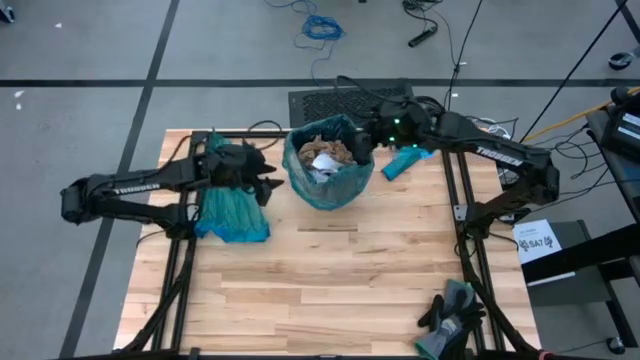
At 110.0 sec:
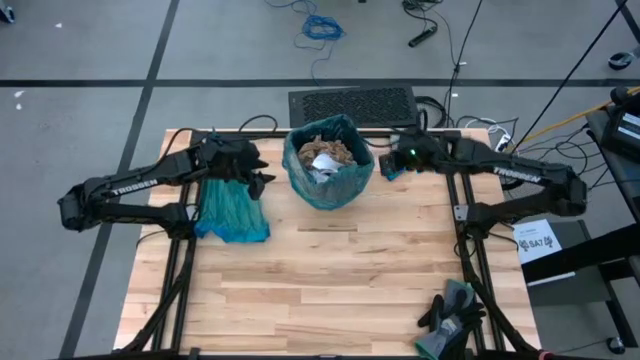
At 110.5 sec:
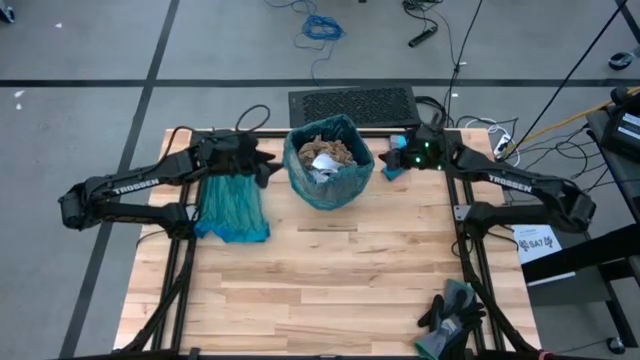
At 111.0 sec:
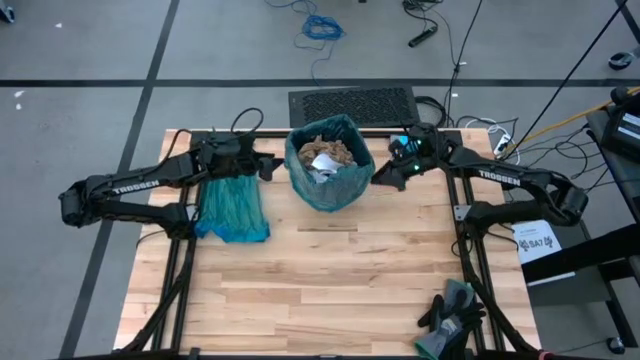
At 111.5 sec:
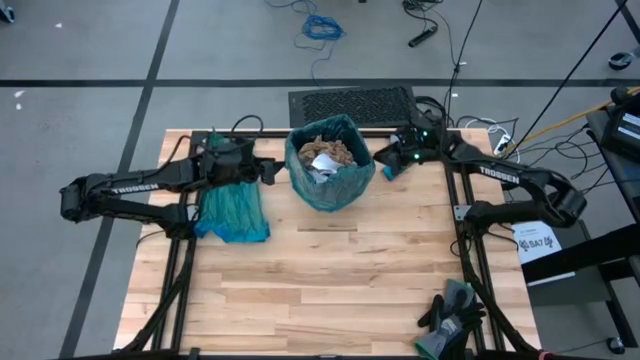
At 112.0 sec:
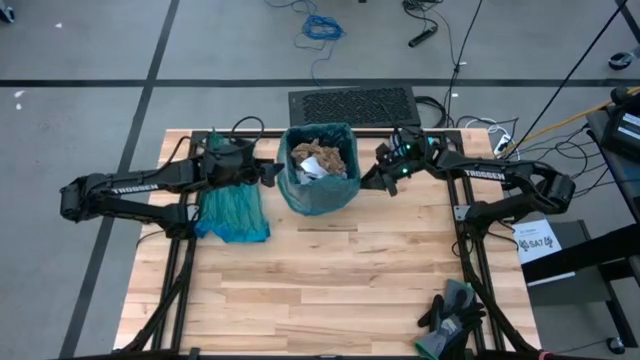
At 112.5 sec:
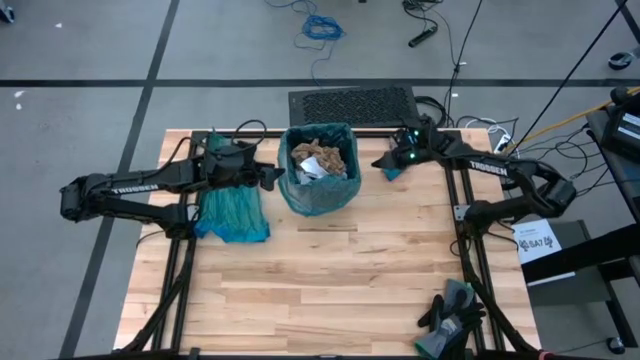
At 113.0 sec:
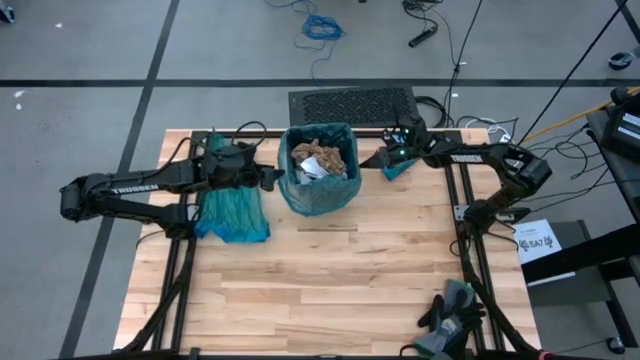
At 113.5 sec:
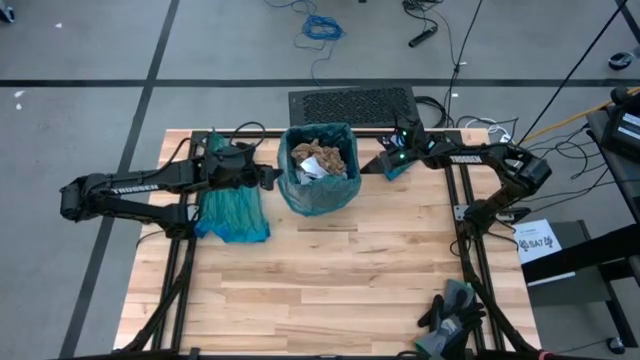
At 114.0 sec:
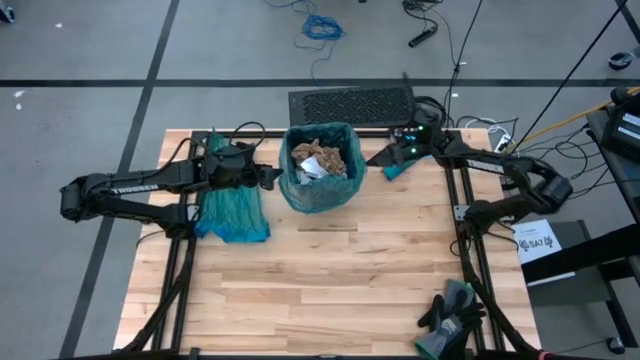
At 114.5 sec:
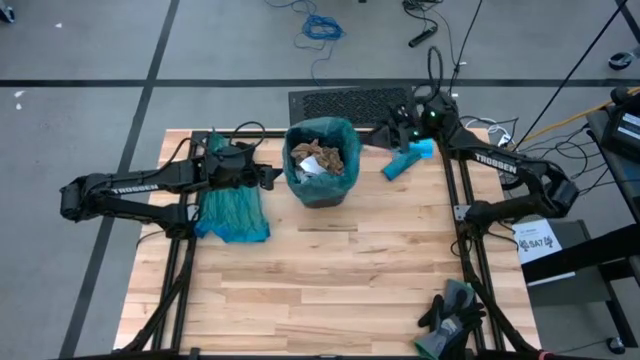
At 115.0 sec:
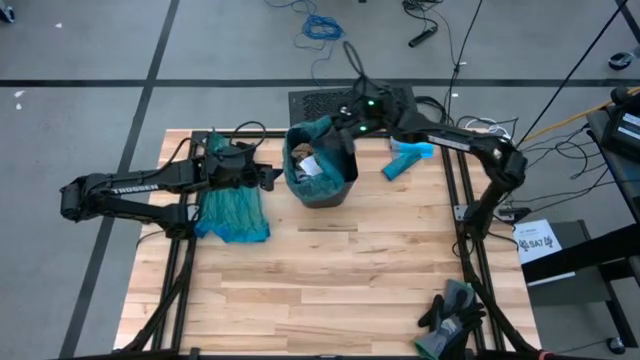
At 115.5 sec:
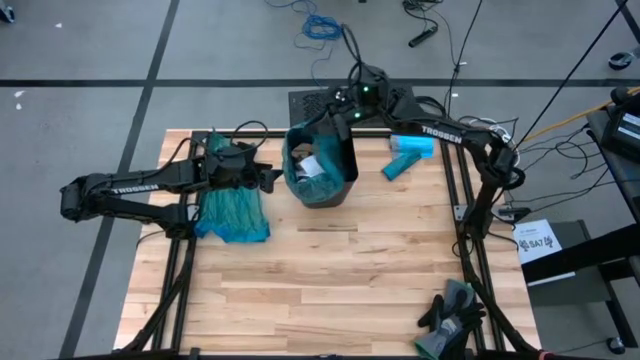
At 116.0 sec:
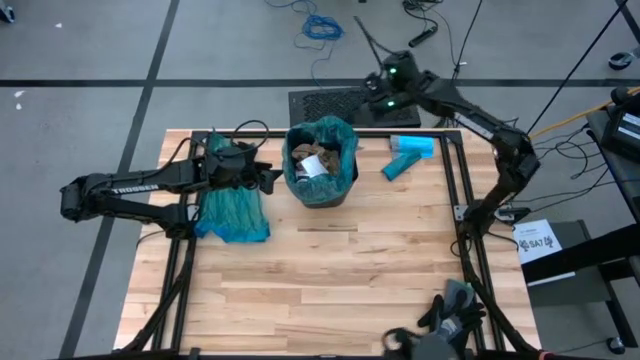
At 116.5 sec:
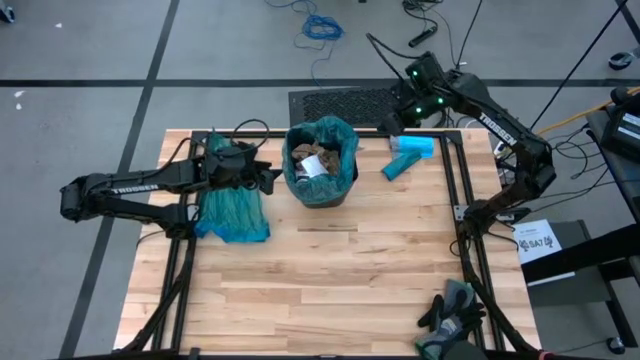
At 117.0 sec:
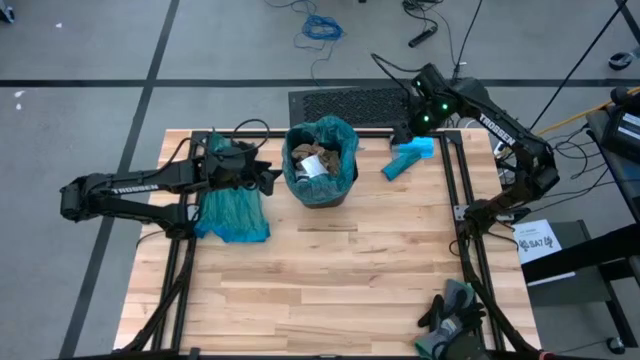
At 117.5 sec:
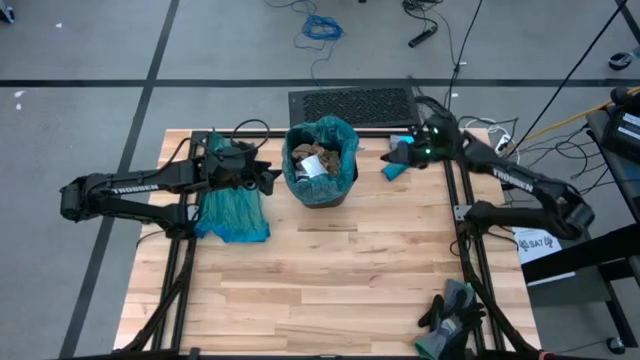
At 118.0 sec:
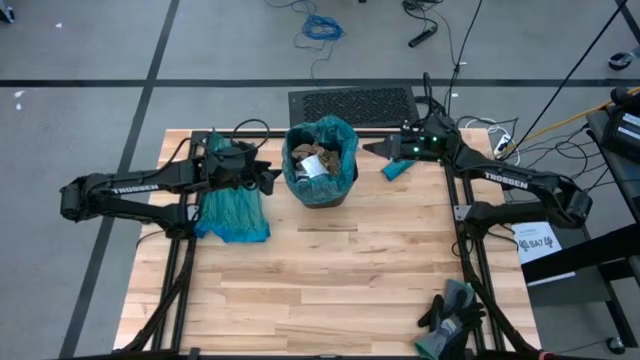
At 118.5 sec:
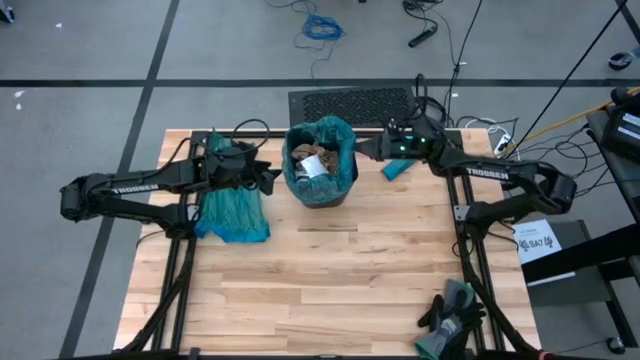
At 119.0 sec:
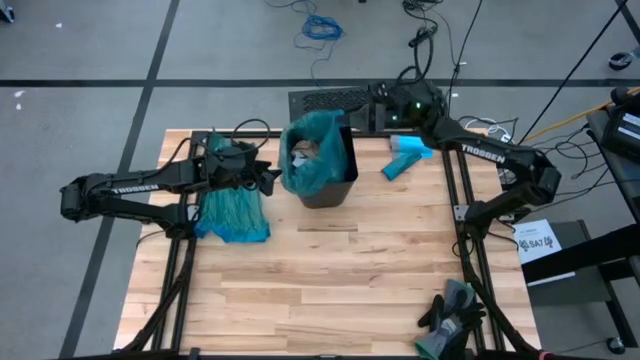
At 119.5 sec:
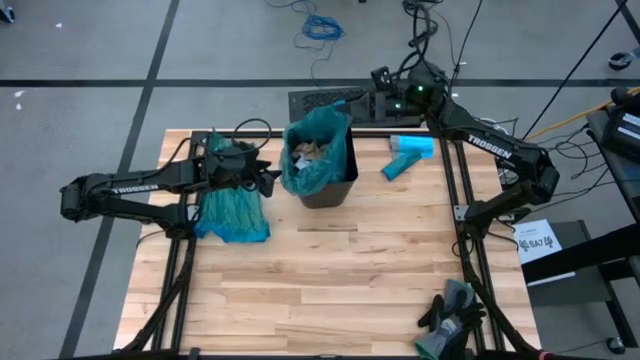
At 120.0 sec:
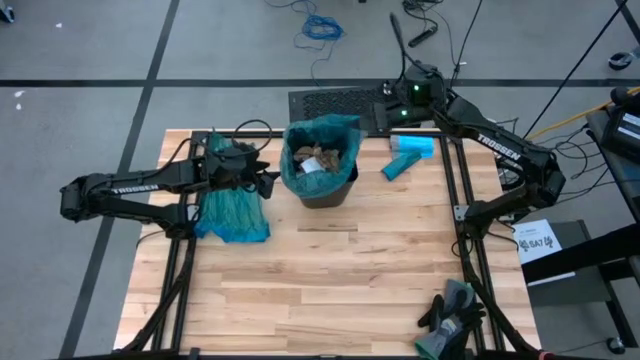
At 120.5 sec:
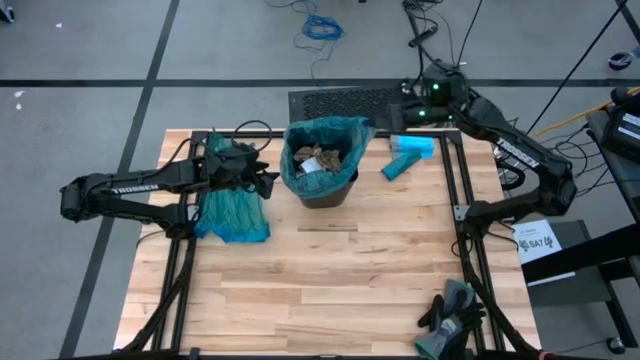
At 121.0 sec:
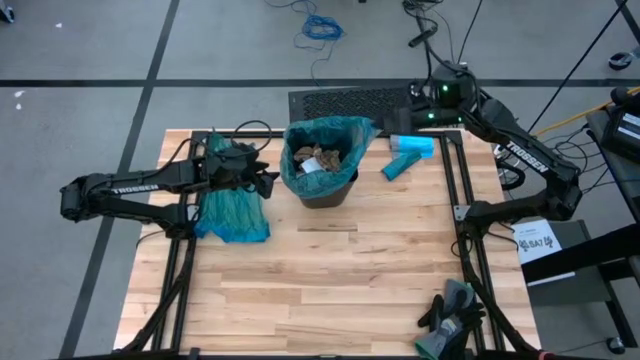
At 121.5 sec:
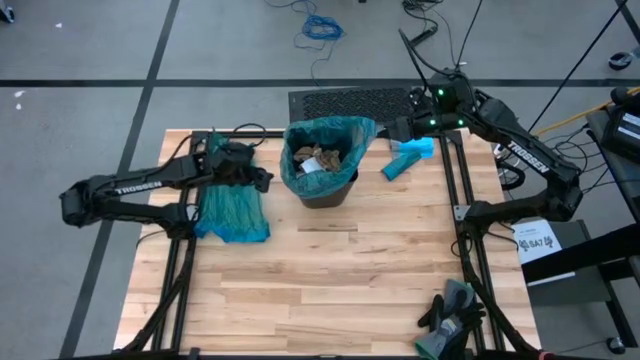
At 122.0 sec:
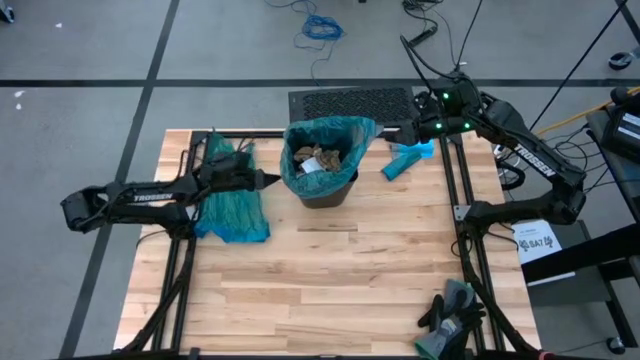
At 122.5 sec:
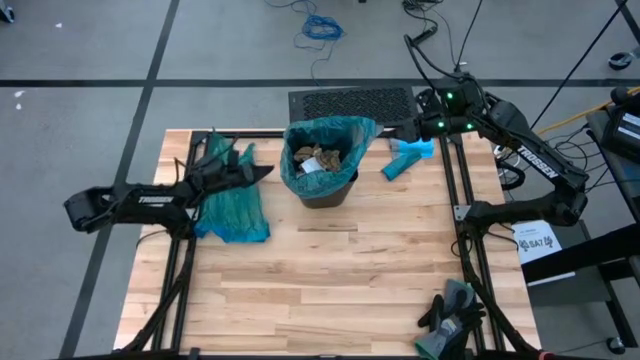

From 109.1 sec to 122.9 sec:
Task: place trash/remove bag and relplace
Remove the blue trash bag from the black trash bin

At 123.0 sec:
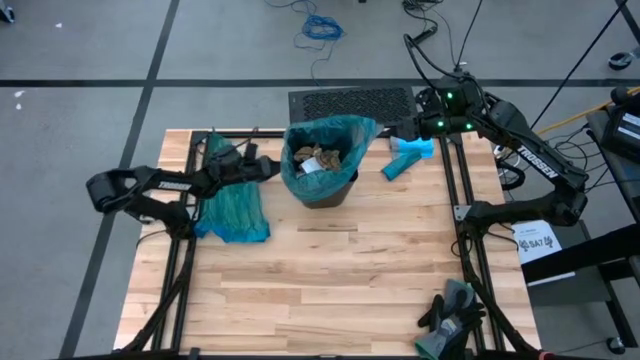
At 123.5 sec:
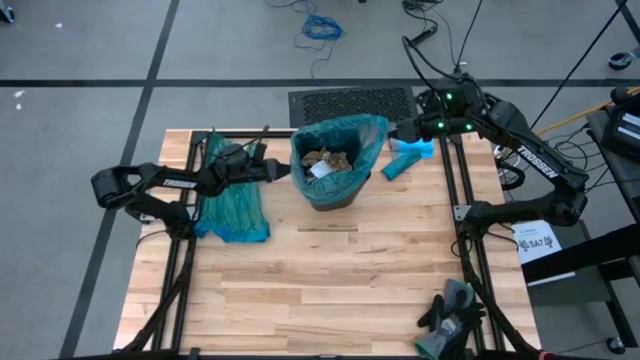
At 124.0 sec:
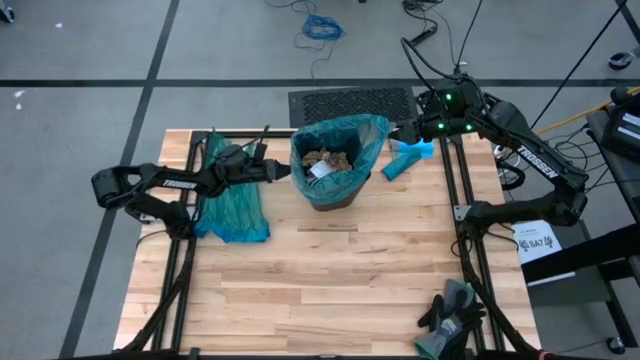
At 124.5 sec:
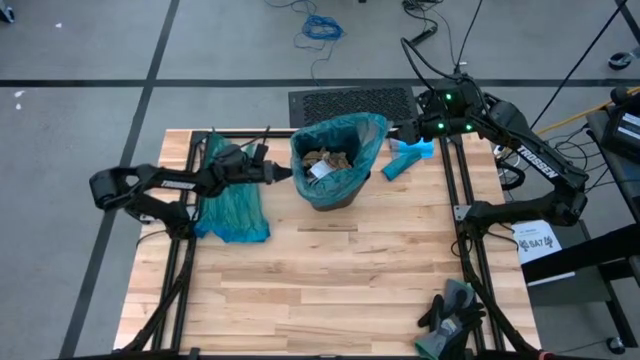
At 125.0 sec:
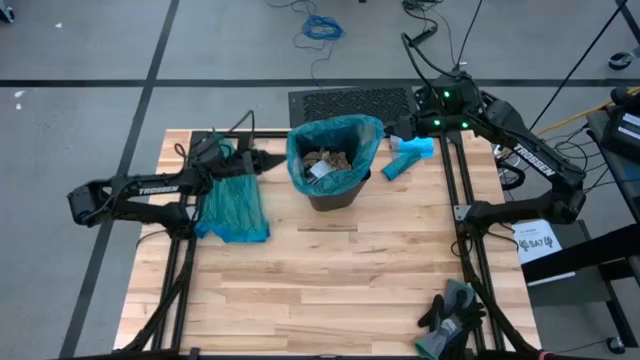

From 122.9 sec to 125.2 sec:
Remove the blue trash bag from the black trash bin
